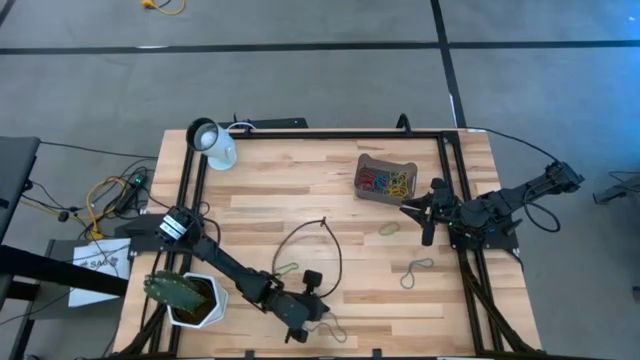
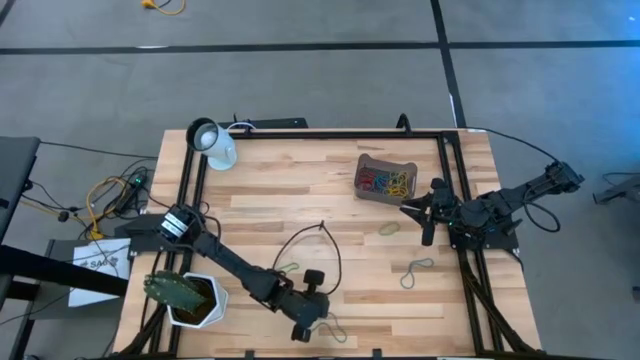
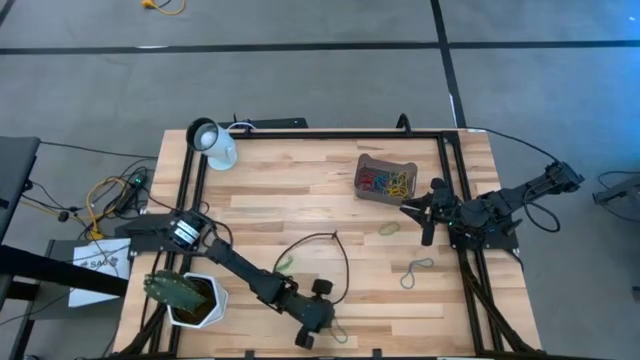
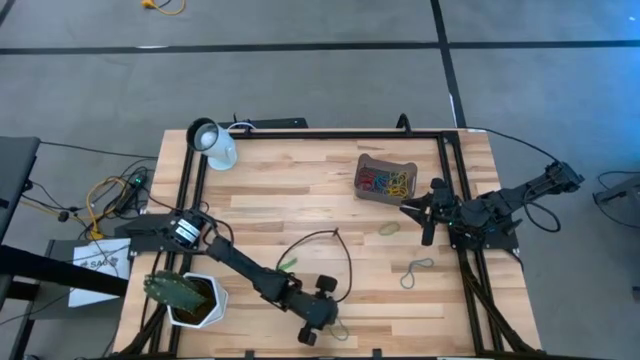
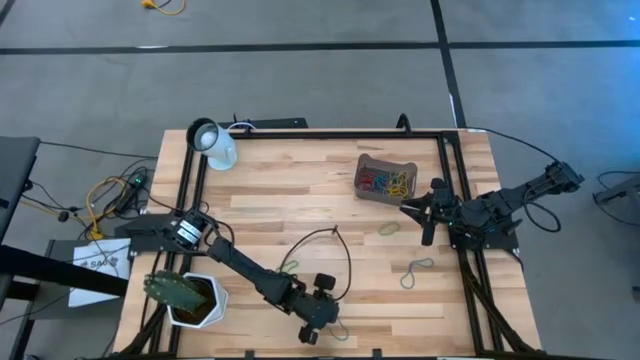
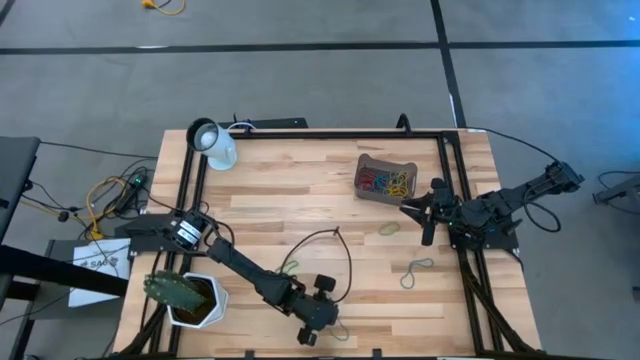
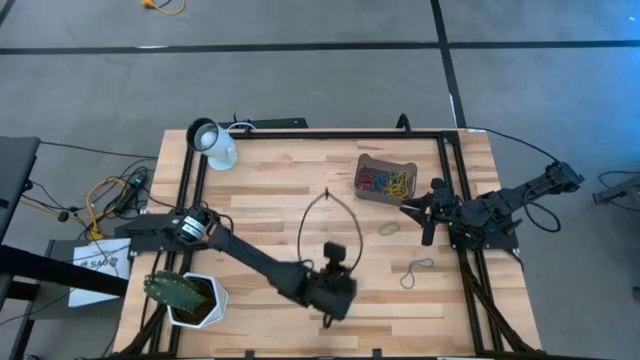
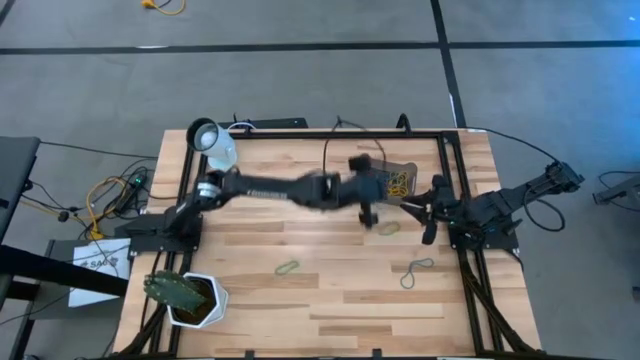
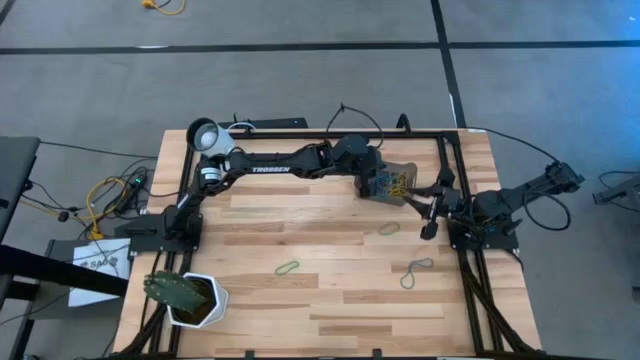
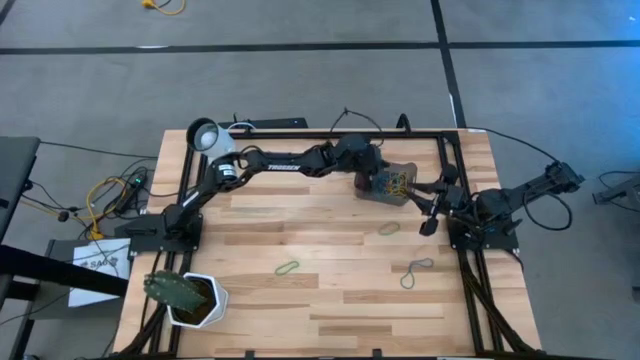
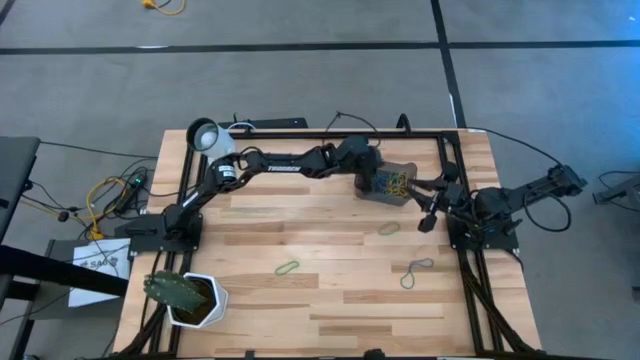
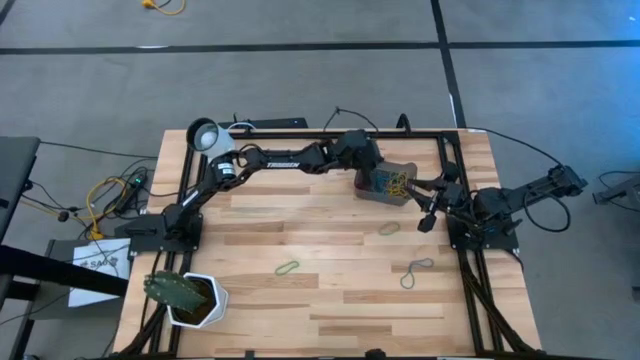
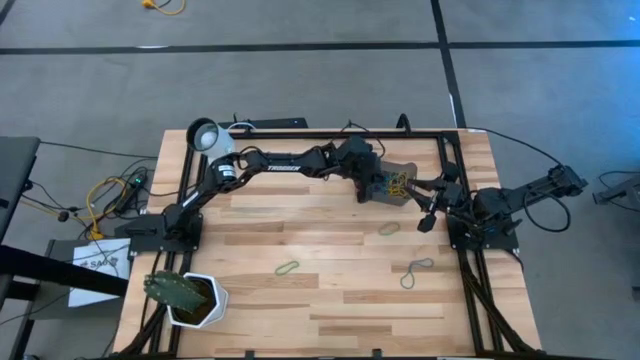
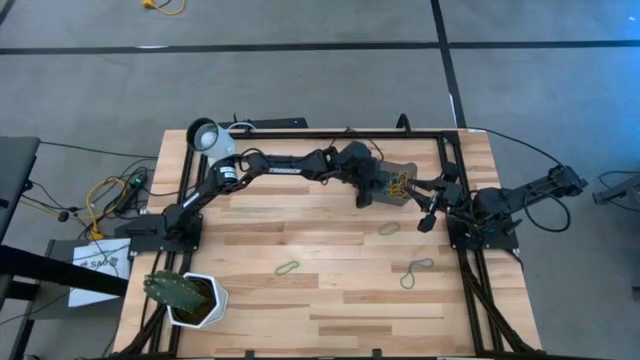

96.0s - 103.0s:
Task: Pick and place rubber bands into bin
Put the blue rubber band into the black container

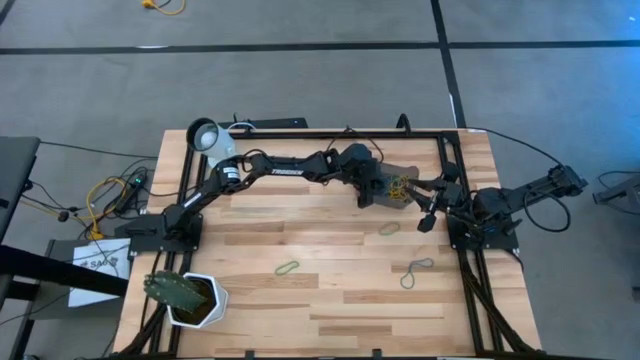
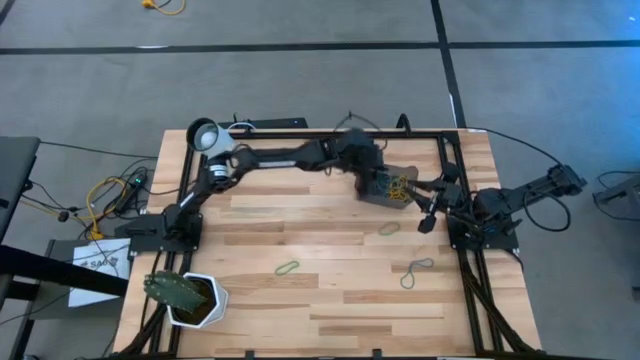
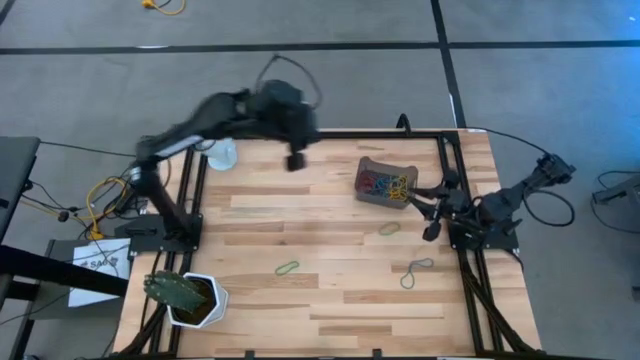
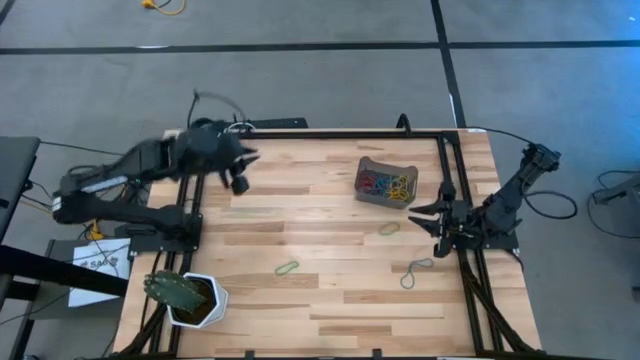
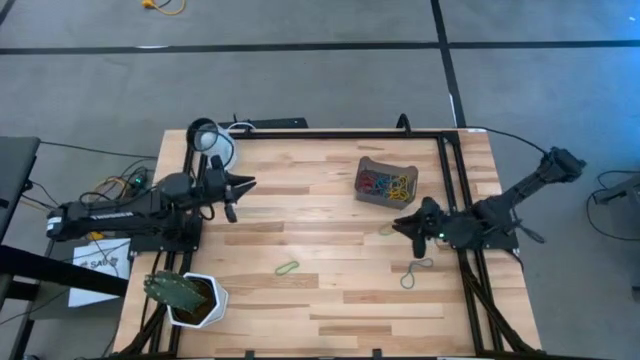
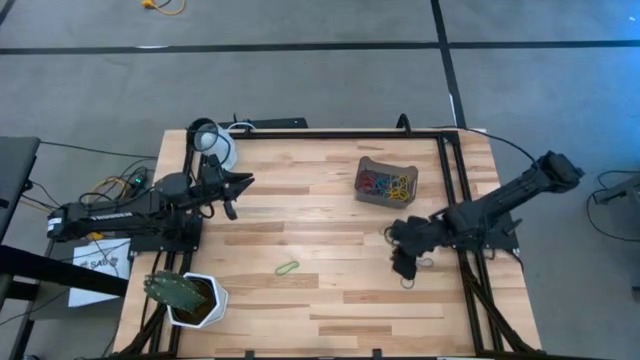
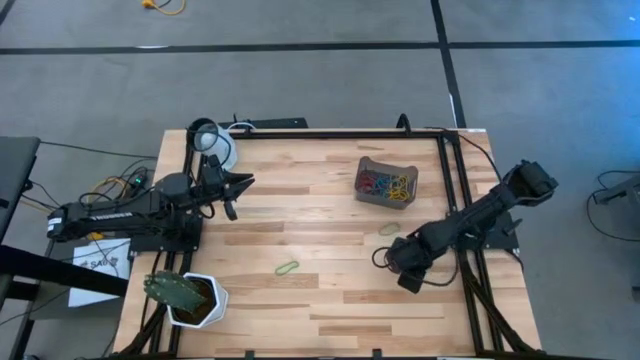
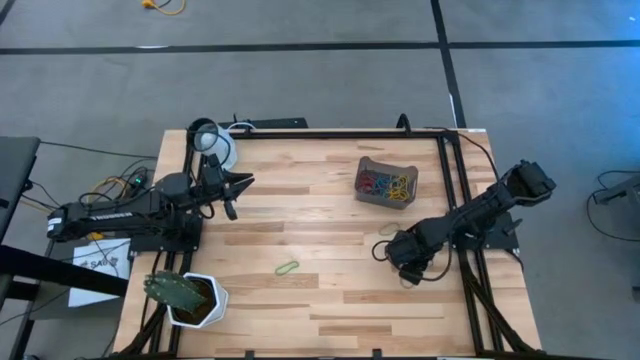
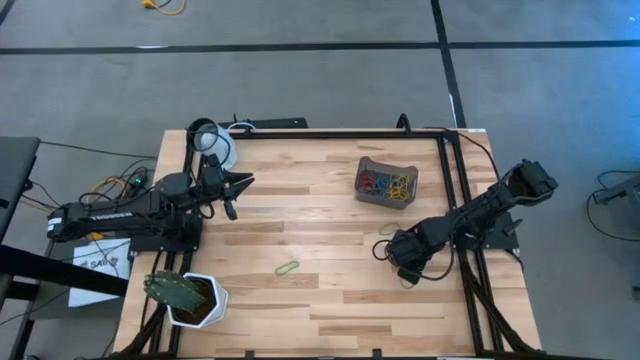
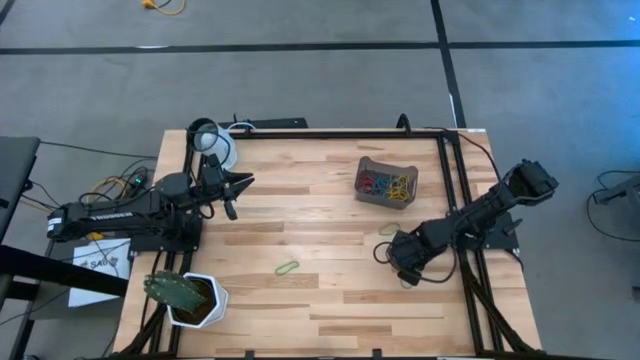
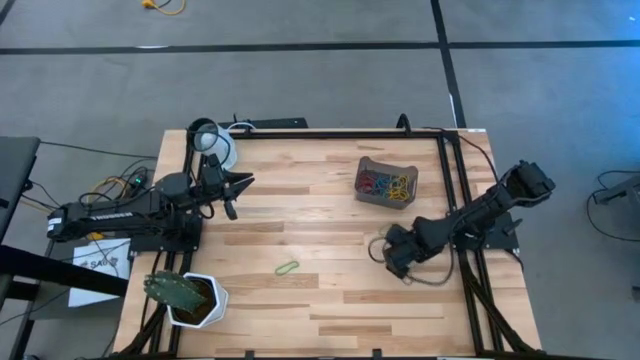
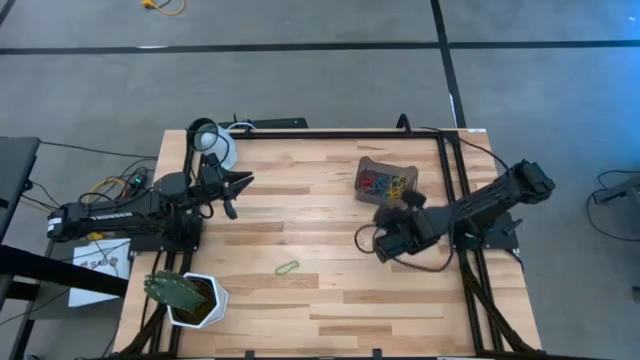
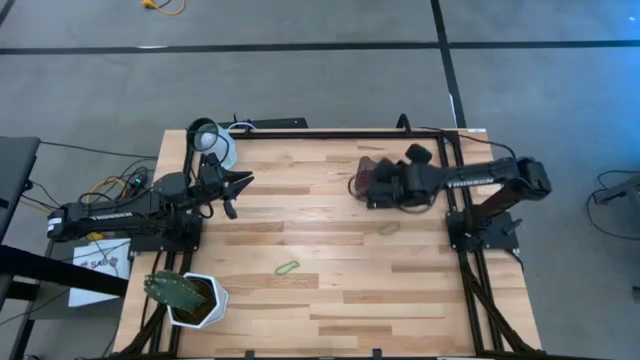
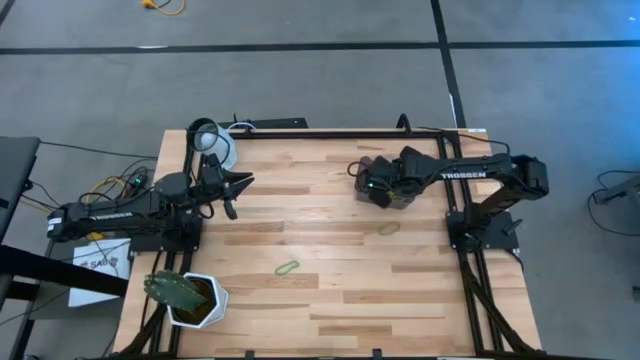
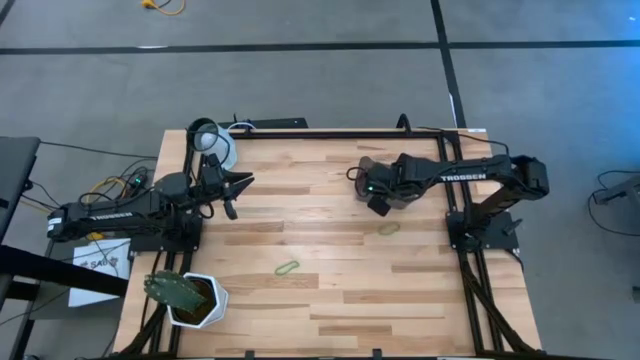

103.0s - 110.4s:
Put the blue rubber band into the black container

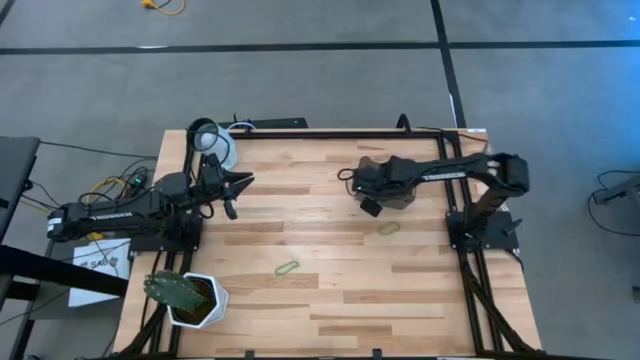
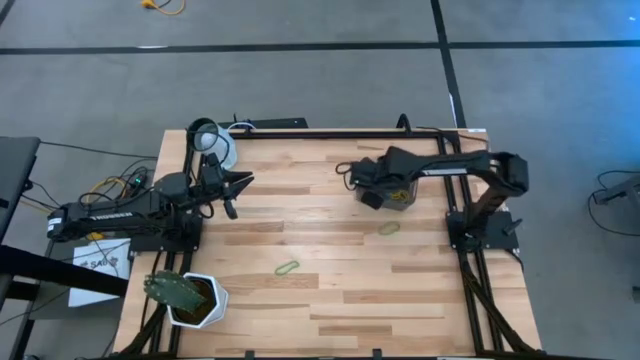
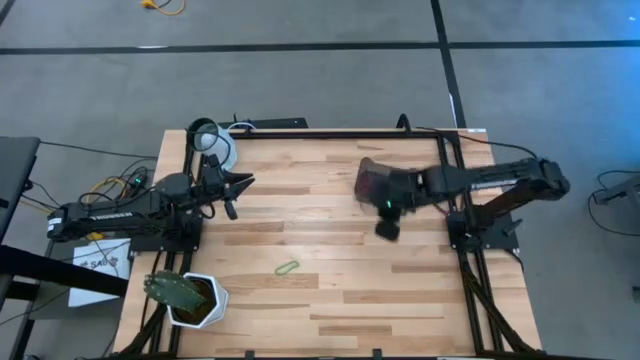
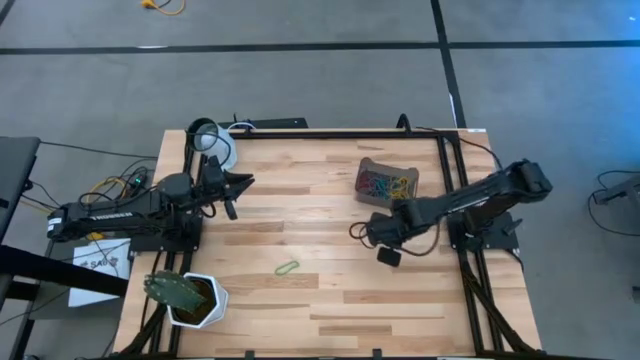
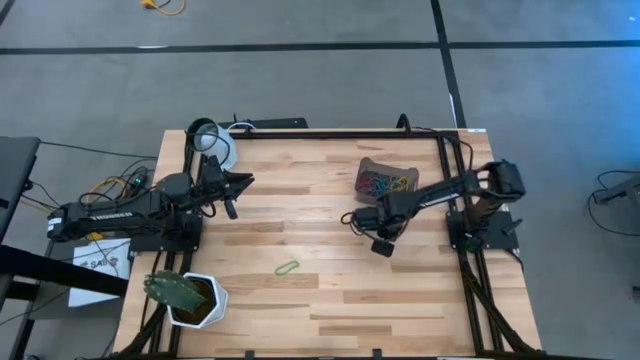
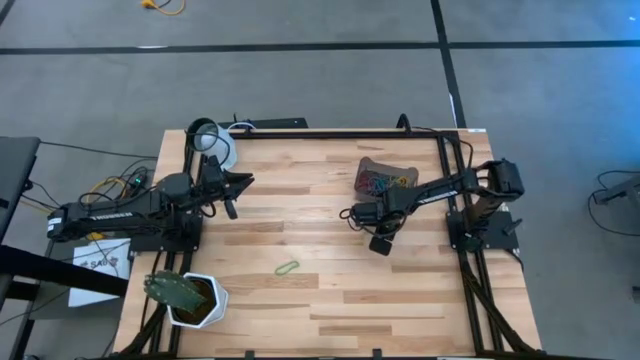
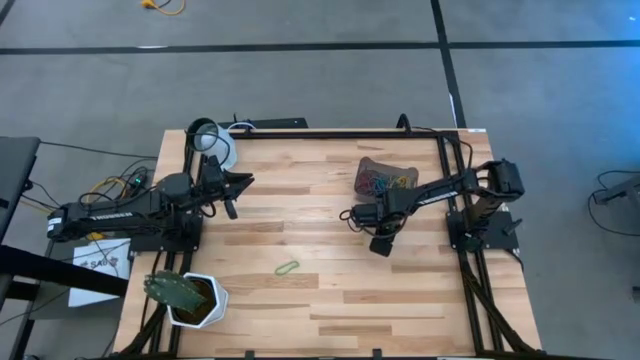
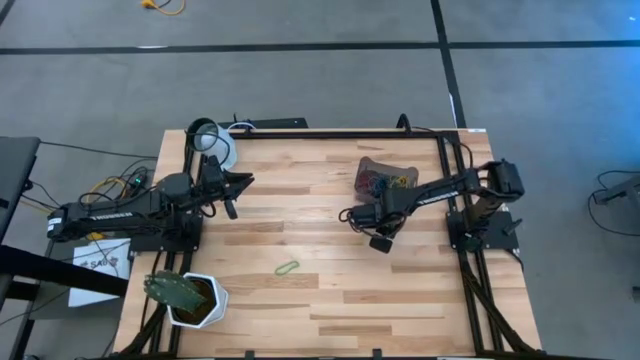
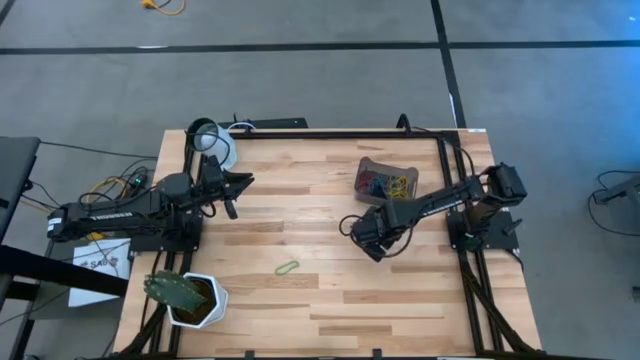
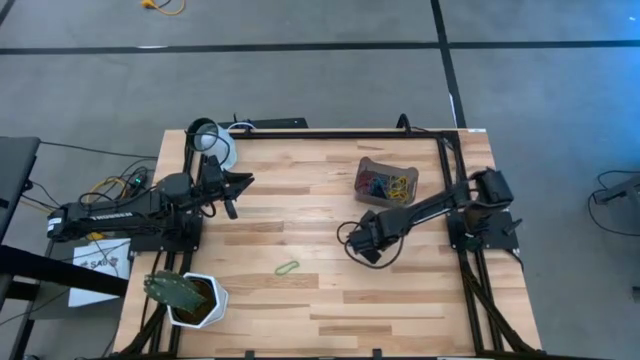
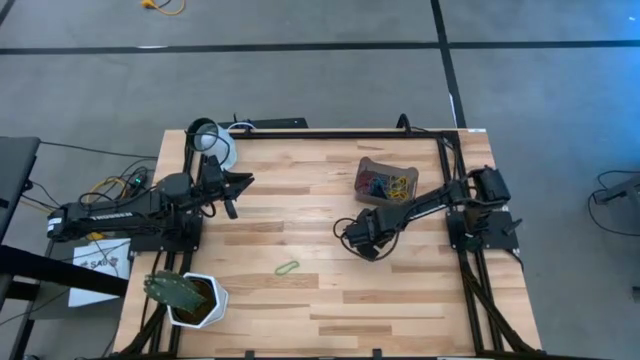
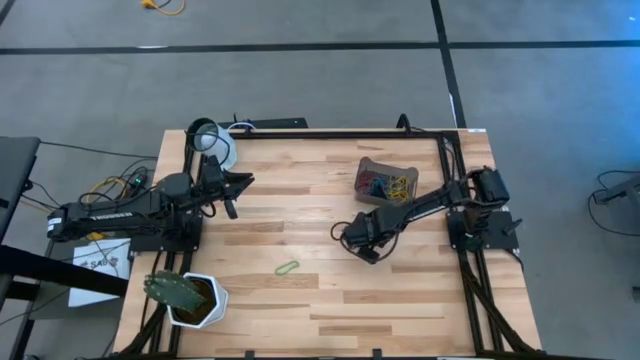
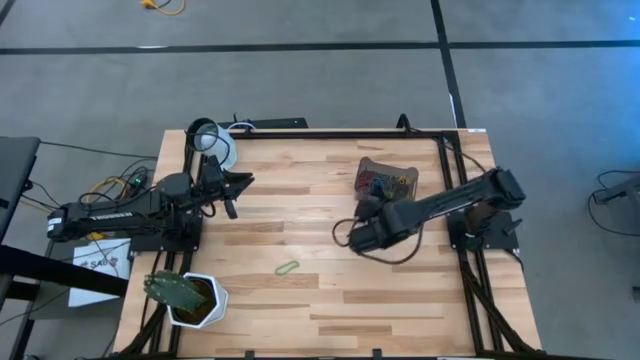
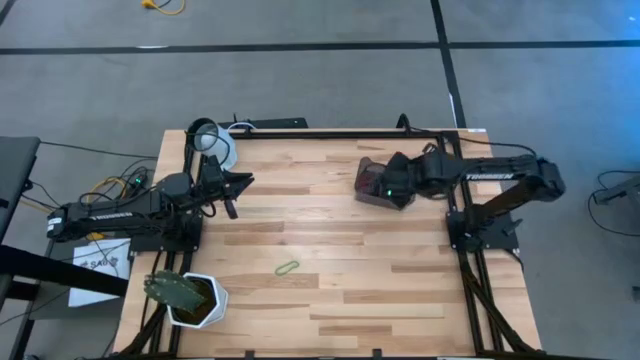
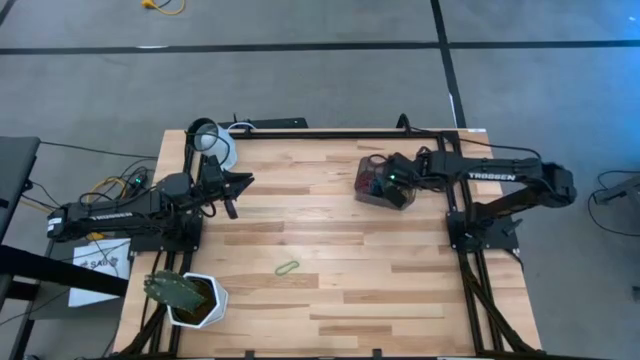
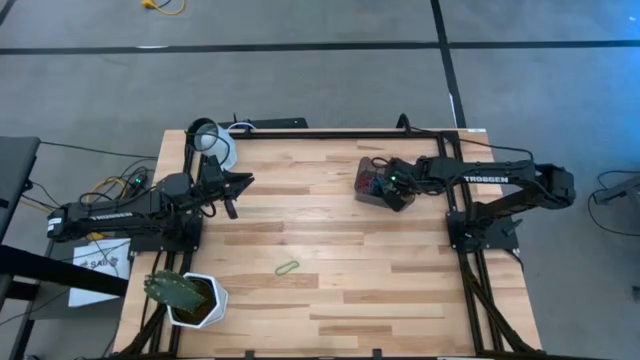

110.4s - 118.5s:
Put the green rubber band into the black container
